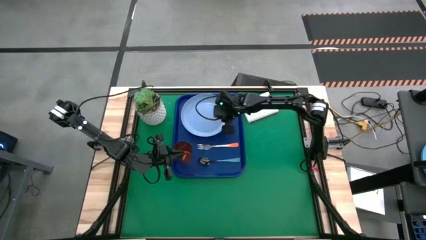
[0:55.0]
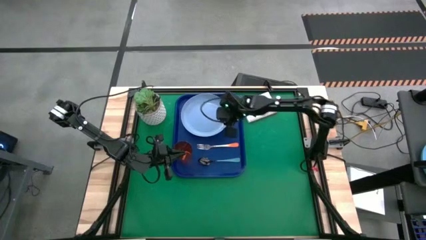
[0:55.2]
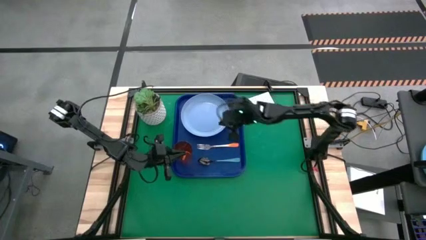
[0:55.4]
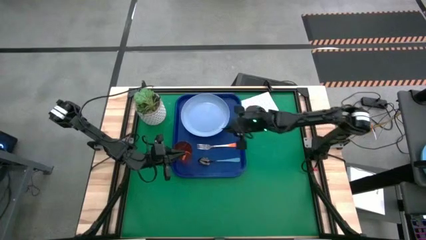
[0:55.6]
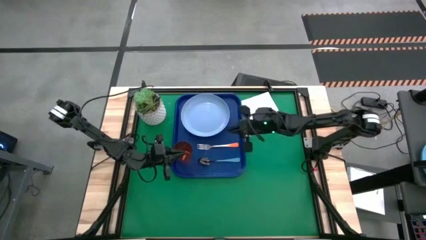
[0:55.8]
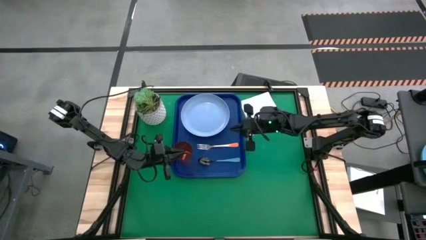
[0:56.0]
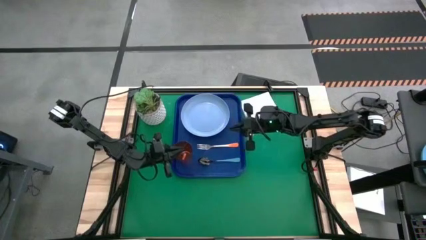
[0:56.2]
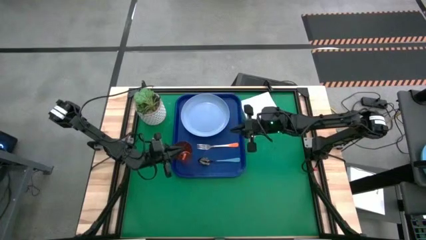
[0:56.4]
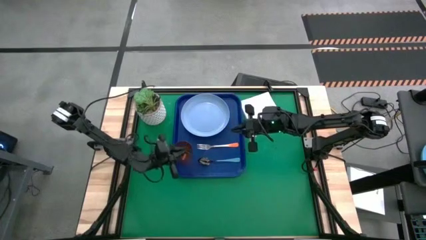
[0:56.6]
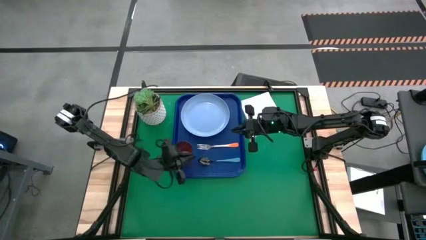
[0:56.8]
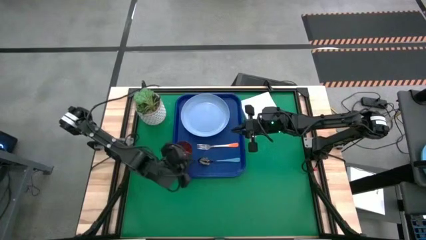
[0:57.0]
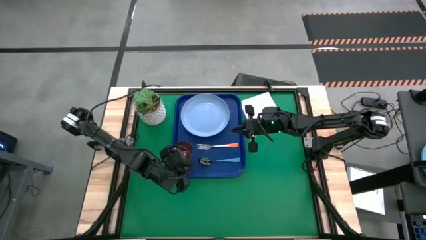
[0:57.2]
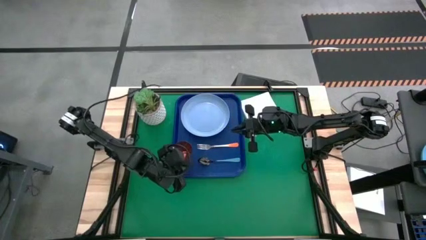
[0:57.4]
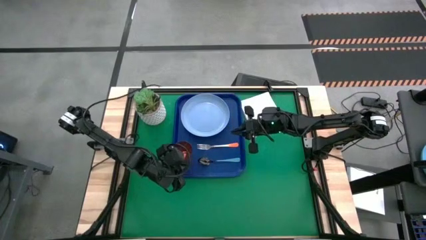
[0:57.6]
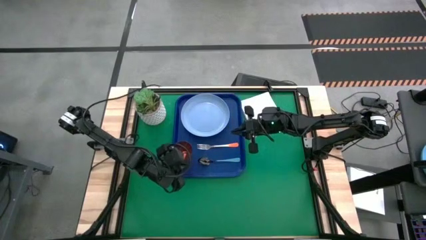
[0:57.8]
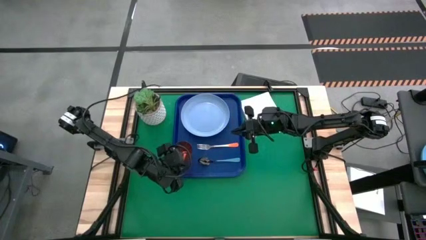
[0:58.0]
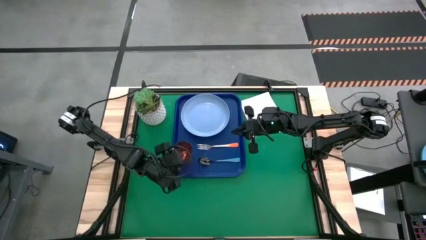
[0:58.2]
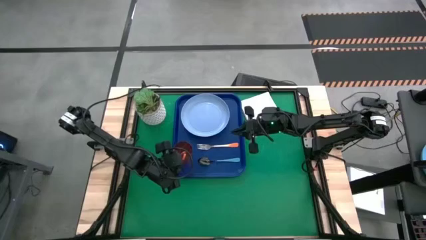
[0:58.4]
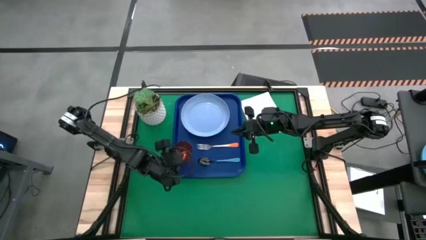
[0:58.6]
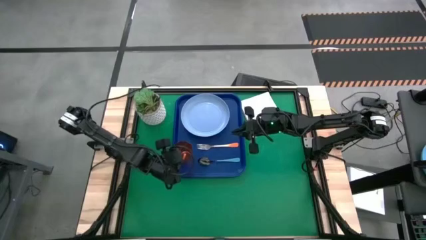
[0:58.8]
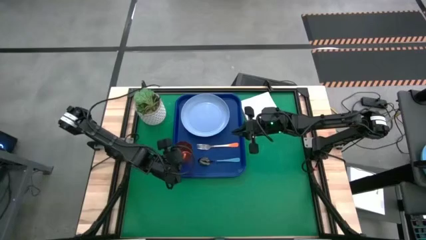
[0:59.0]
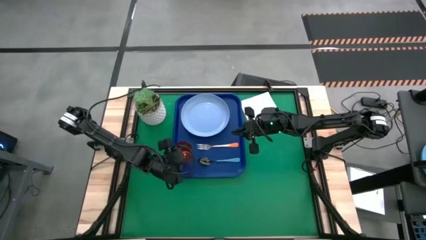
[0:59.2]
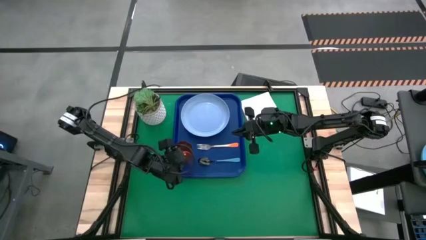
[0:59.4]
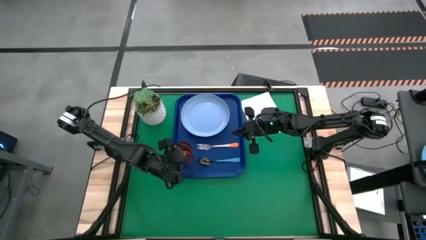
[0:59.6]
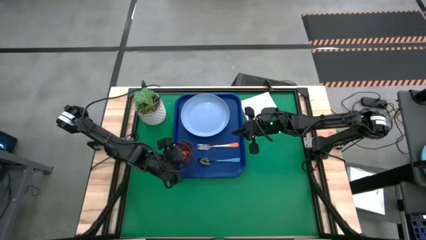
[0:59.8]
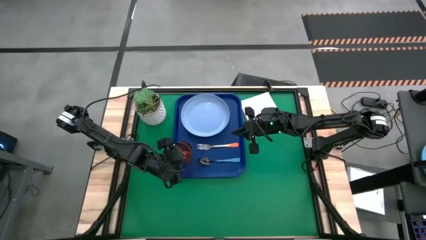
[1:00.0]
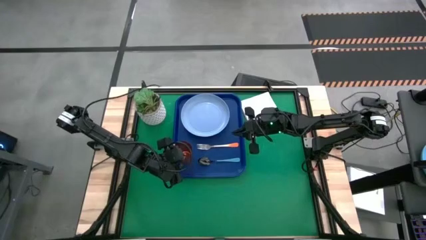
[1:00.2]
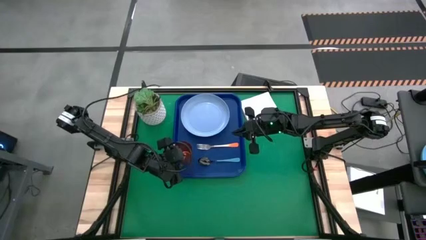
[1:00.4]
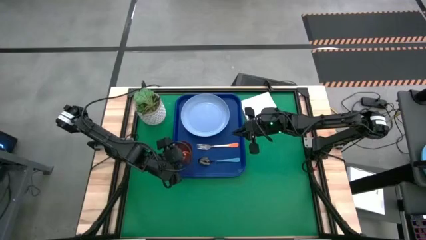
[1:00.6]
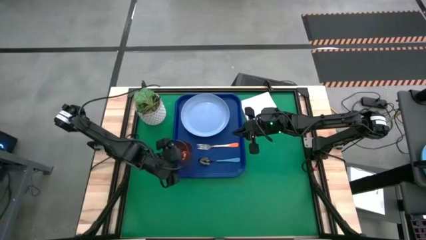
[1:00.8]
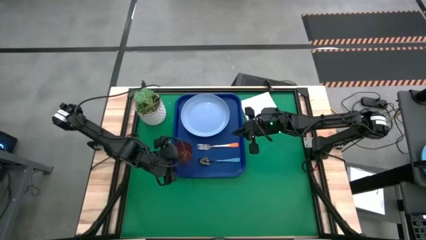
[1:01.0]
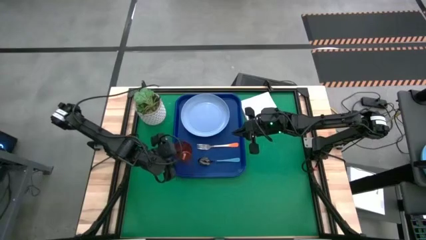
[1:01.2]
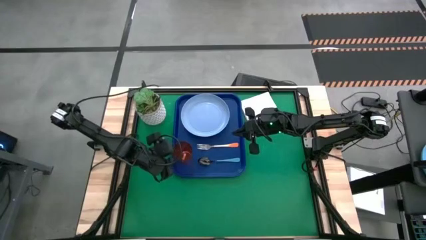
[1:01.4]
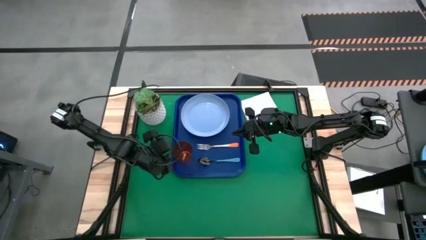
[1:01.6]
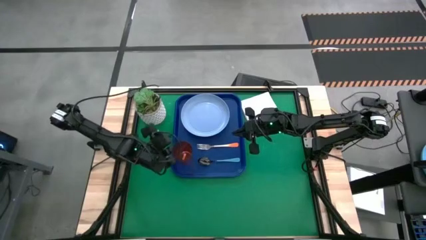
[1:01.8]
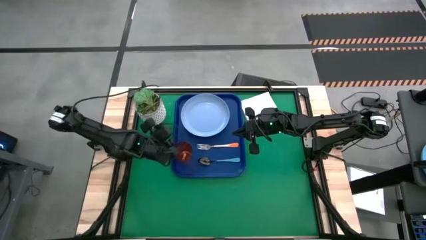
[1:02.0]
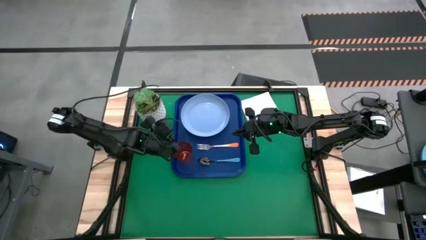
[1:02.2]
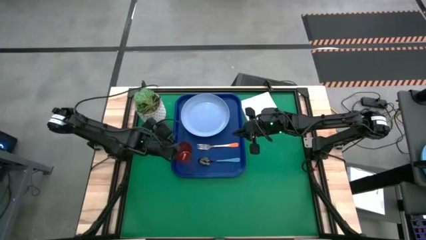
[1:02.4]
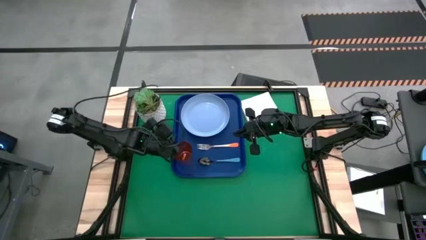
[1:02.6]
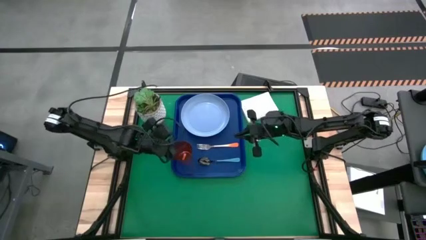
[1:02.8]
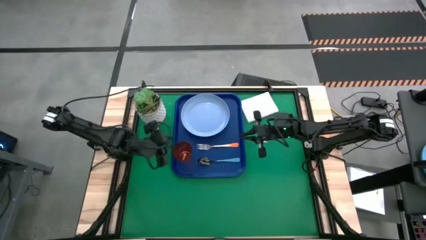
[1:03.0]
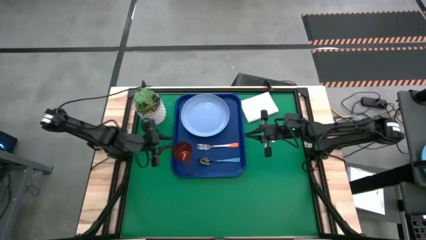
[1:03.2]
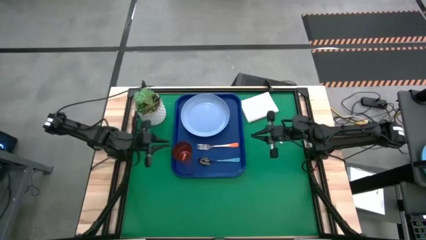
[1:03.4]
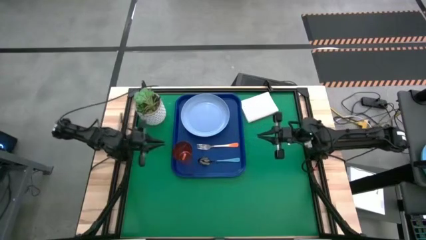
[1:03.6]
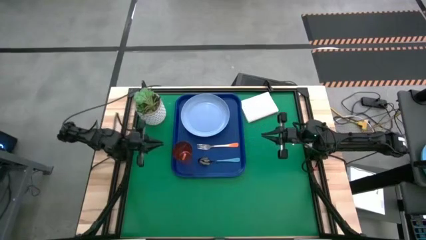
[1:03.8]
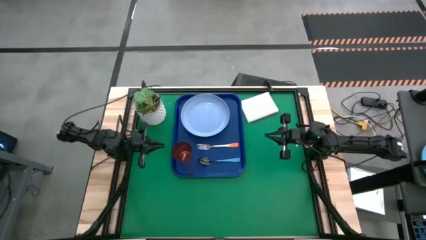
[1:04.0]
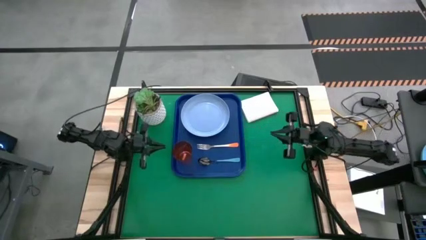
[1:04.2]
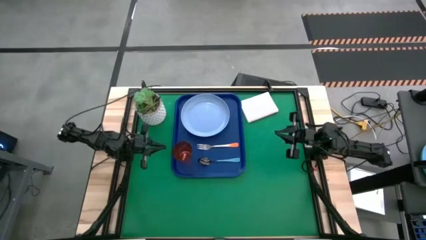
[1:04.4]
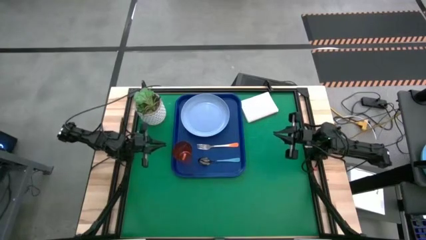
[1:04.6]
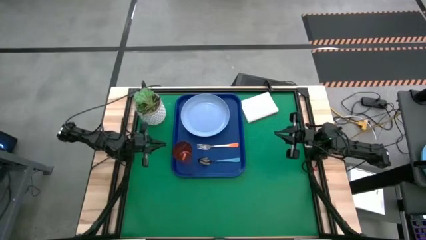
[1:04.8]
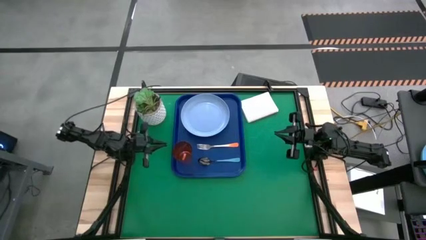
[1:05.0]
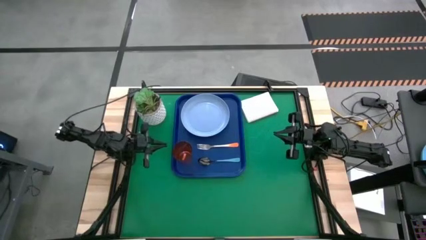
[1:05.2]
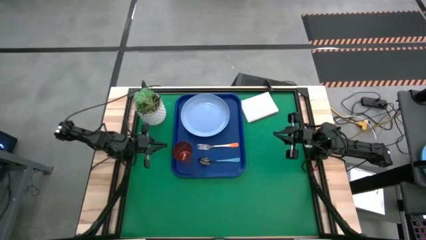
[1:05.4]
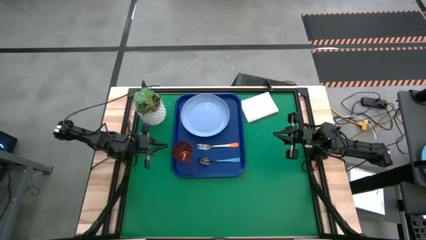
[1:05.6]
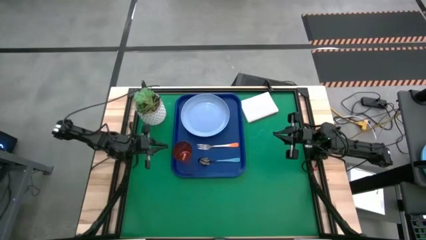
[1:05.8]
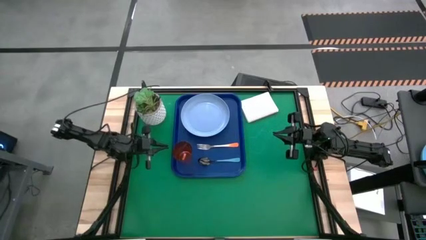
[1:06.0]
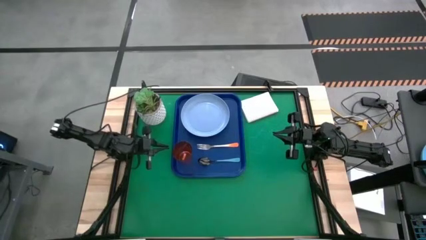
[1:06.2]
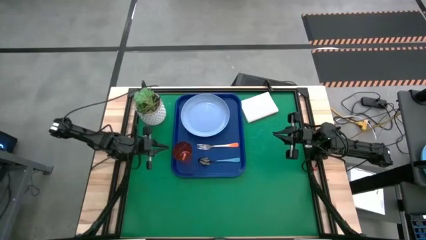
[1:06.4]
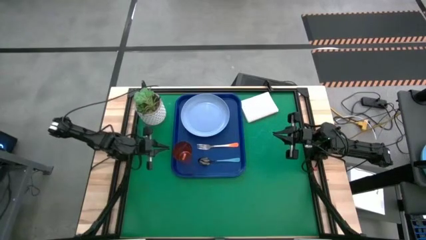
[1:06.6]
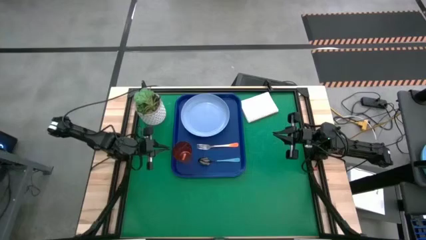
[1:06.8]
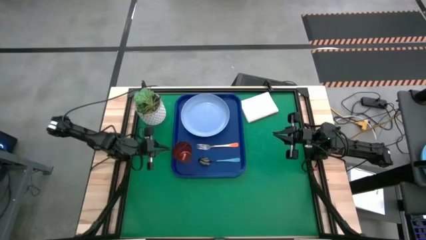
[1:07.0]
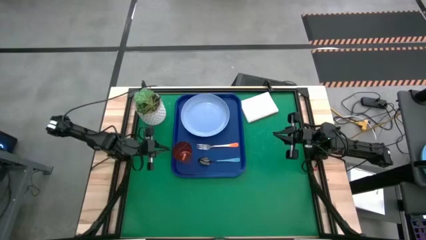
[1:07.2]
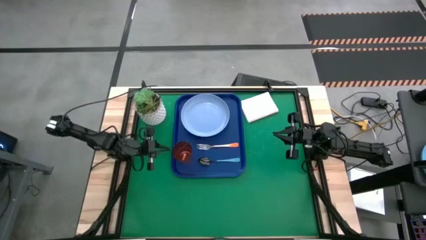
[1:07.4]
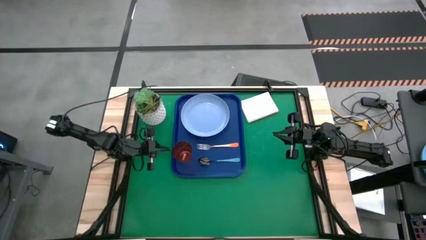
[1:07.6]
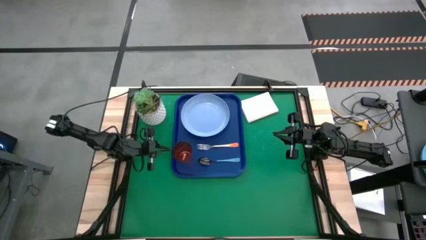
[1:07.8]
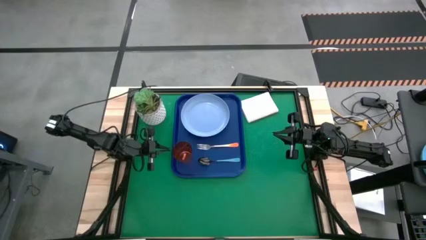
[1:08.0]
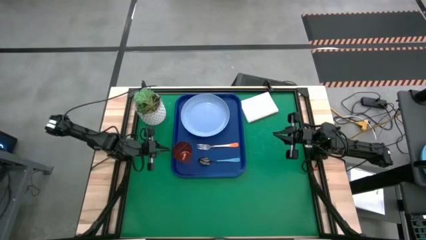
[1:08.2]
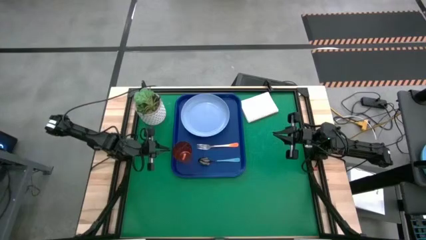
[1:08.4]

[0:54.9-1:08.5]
Task: Pick and place plate/cup/fork/spoon on tray
Return to Home Position

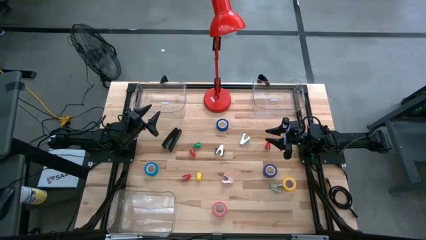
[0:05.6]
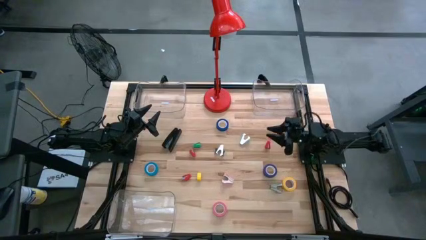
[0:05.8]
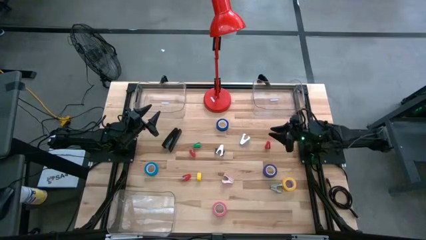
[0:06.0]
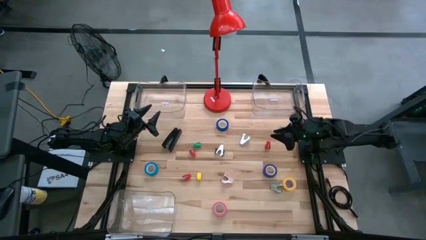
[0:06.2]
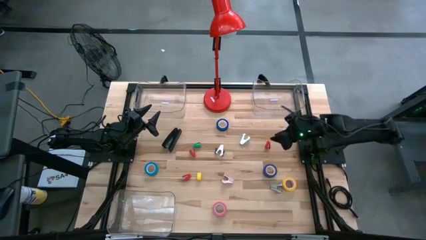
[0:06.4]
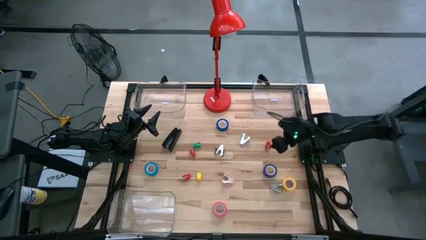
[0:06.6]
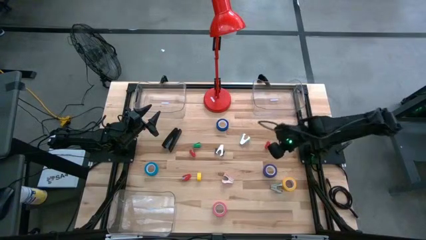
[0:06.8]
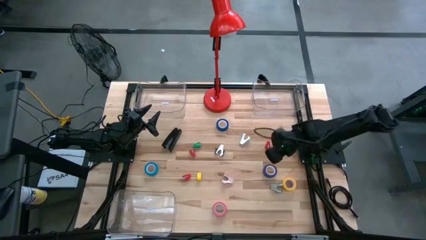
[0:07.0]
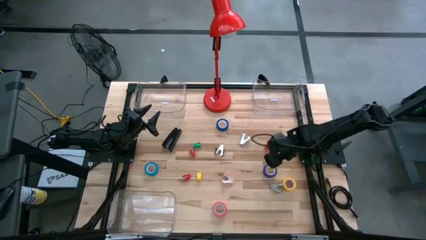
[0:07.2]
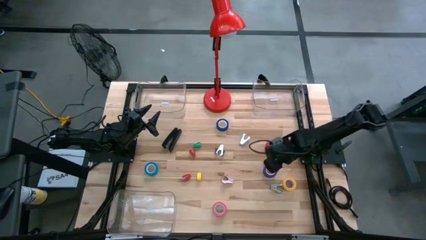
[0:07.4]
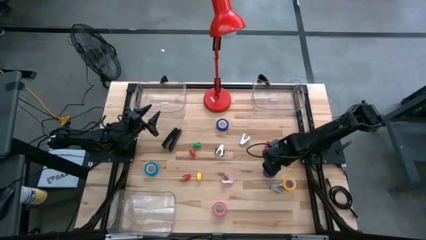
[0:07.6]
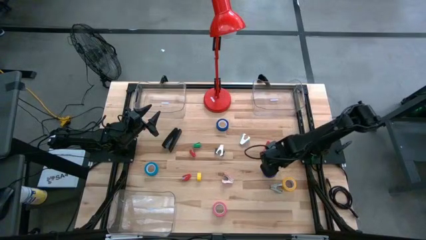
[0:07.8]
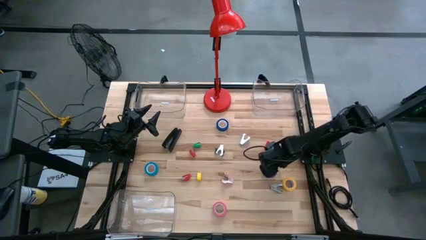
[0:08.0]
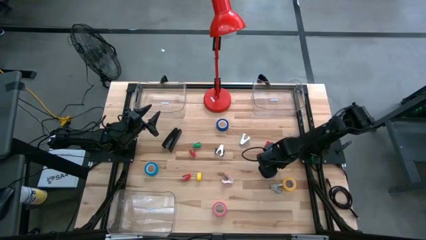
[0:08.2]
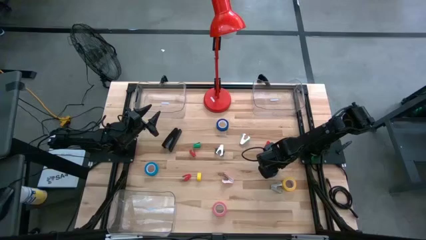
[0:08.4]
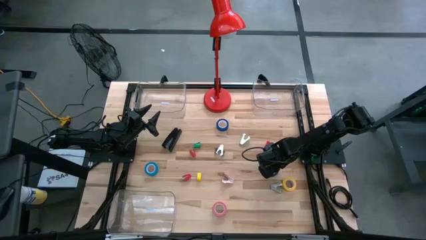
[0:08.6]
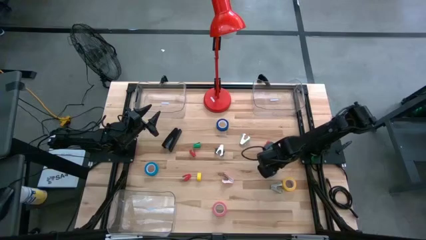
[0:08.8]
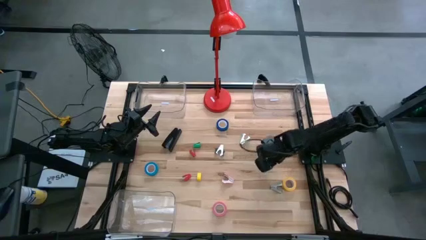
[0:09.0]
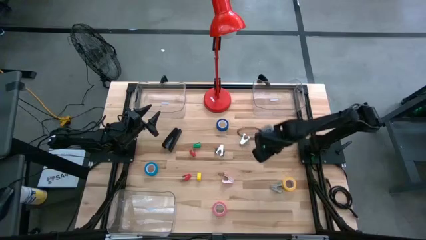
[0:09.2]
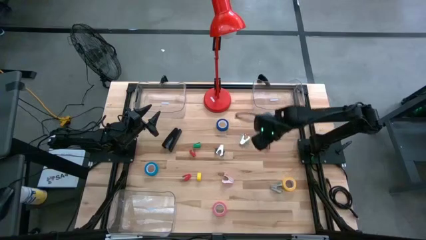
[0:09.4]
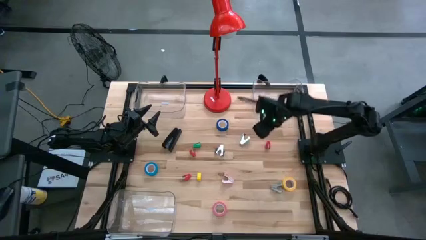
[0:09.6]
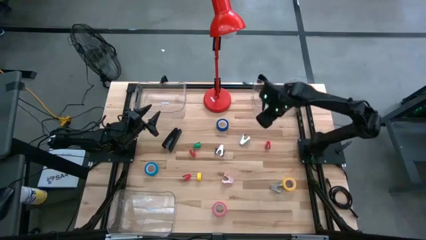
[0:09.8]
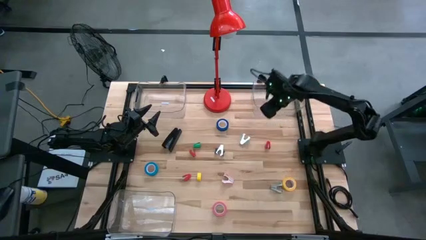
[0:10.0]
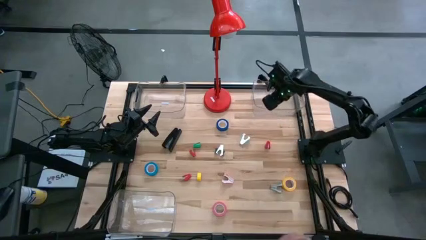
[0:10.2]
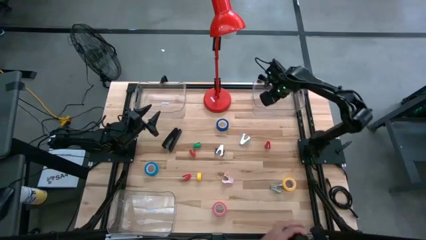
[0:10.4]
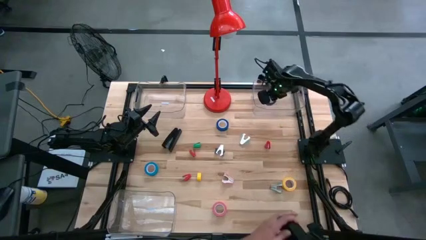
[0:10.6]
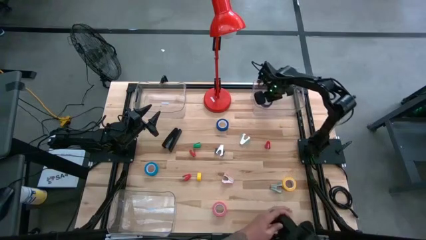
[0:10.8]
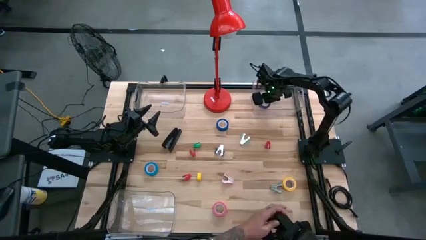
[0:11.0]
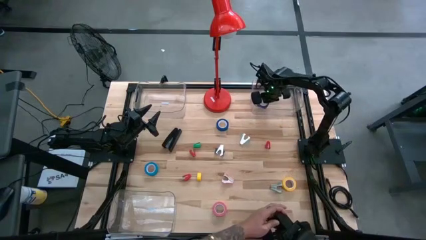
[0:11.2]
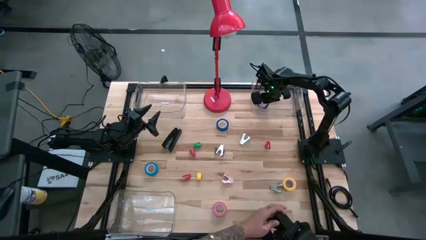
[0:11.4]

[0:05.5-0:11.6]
Task: Pick and place Stapler, Stapler remover, tape
Put the bottom blue tape into the top right transparent bin
